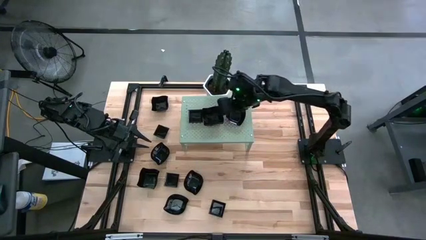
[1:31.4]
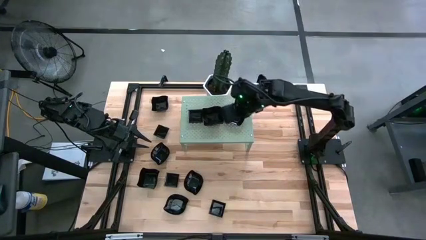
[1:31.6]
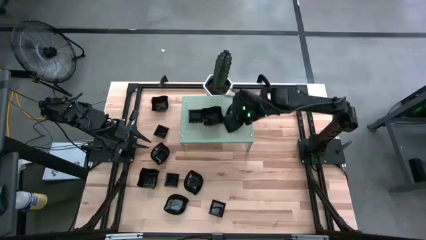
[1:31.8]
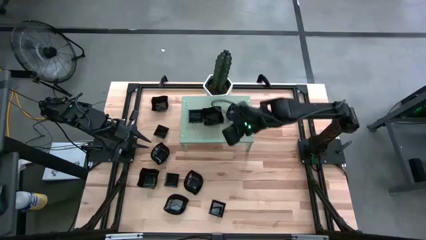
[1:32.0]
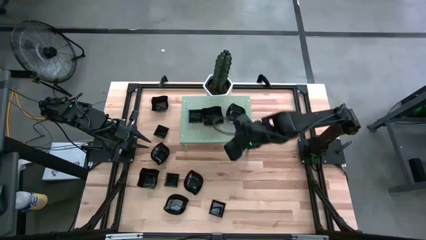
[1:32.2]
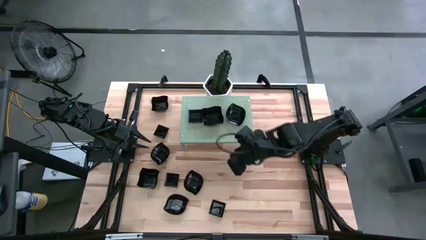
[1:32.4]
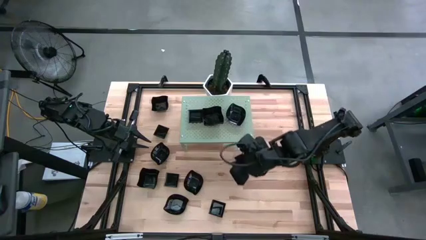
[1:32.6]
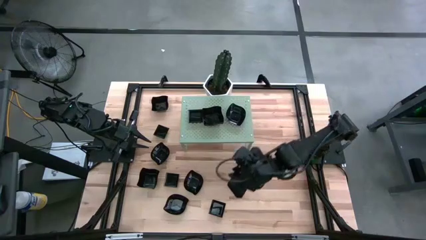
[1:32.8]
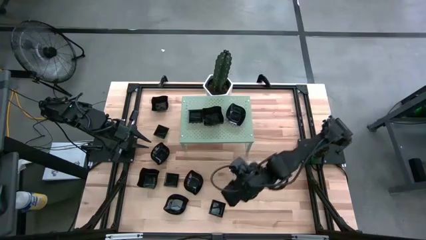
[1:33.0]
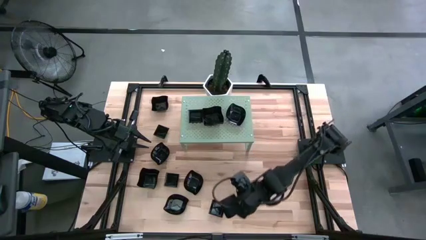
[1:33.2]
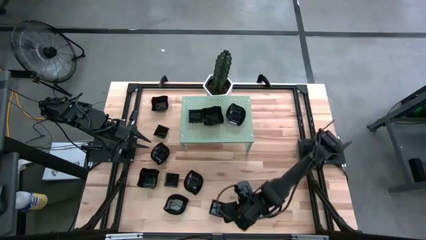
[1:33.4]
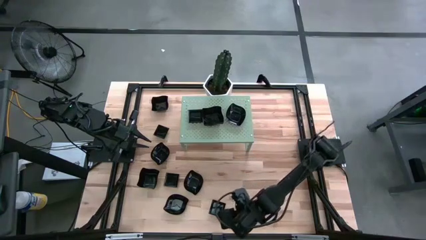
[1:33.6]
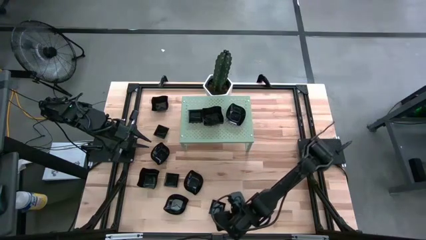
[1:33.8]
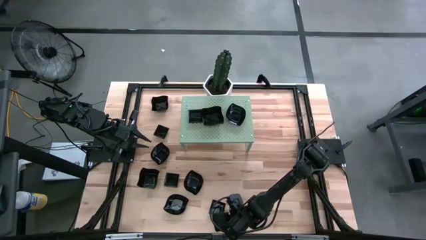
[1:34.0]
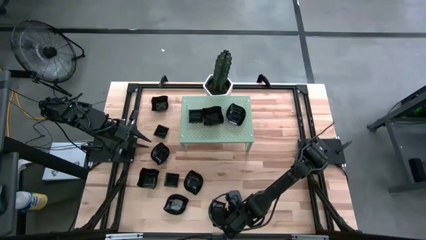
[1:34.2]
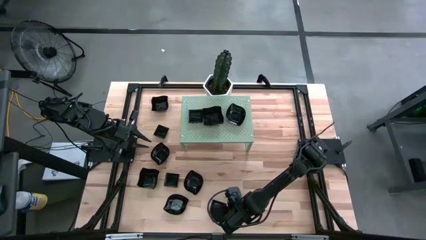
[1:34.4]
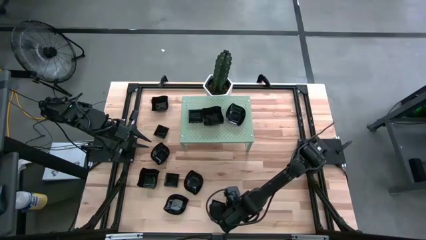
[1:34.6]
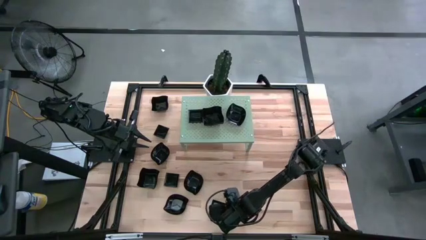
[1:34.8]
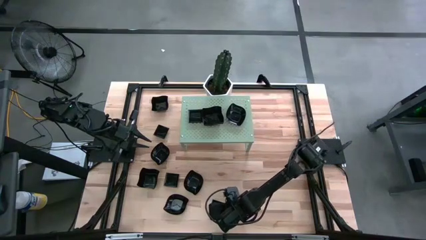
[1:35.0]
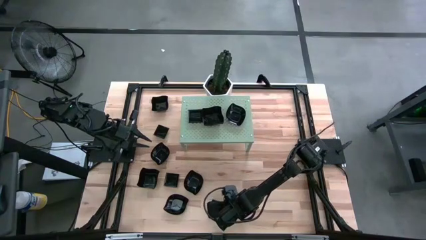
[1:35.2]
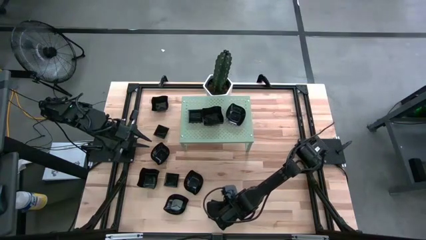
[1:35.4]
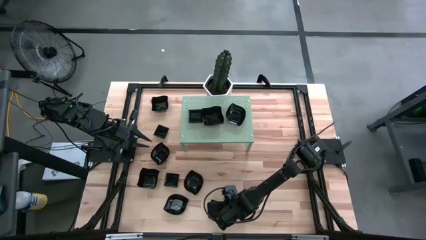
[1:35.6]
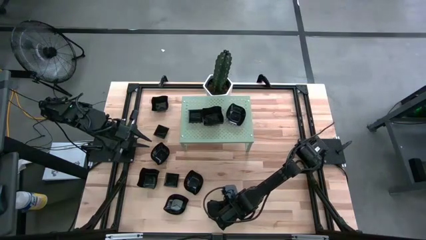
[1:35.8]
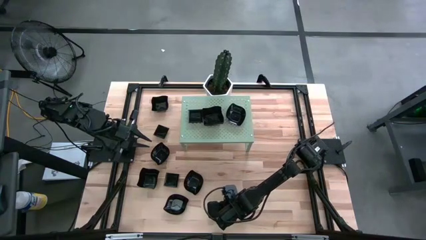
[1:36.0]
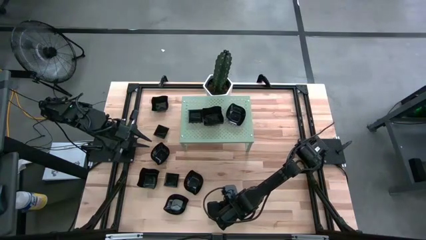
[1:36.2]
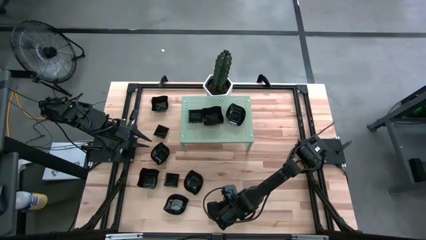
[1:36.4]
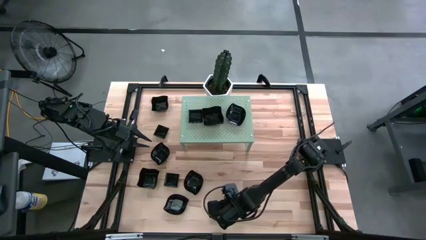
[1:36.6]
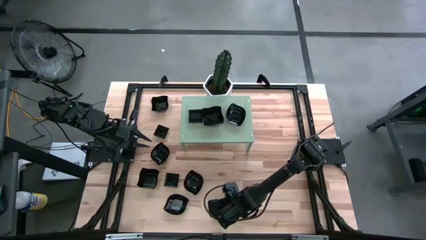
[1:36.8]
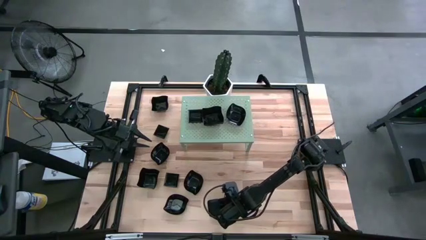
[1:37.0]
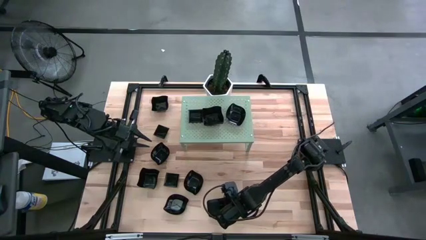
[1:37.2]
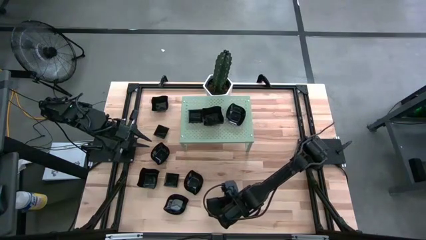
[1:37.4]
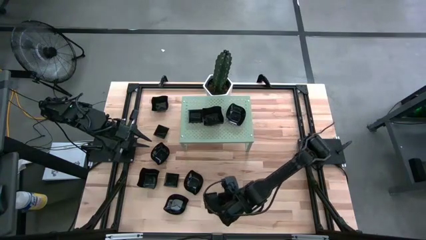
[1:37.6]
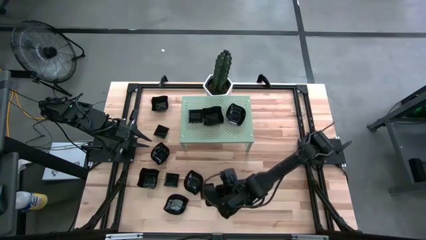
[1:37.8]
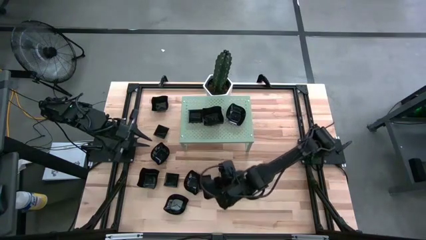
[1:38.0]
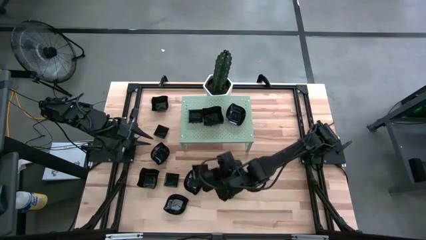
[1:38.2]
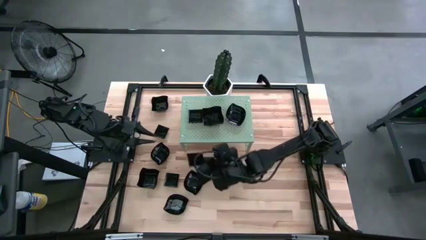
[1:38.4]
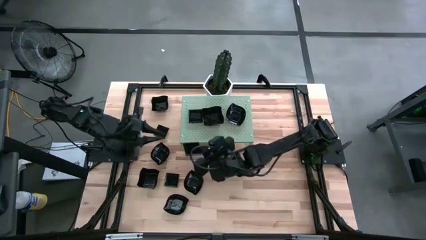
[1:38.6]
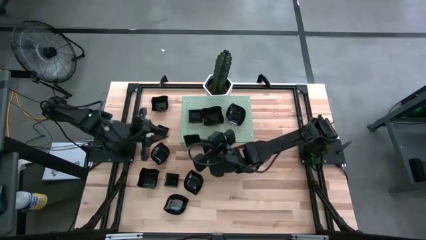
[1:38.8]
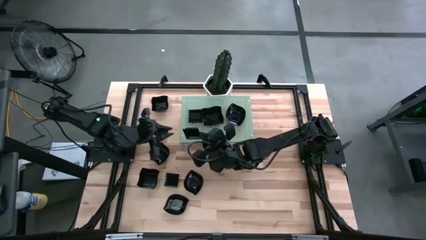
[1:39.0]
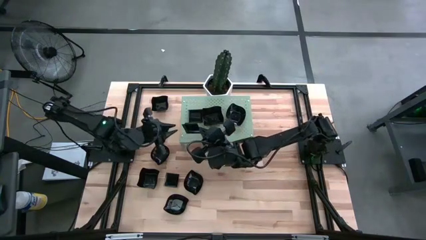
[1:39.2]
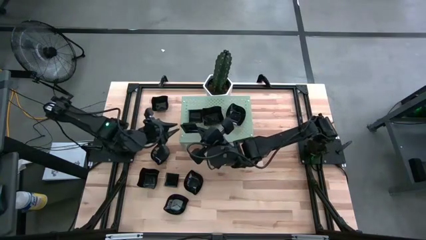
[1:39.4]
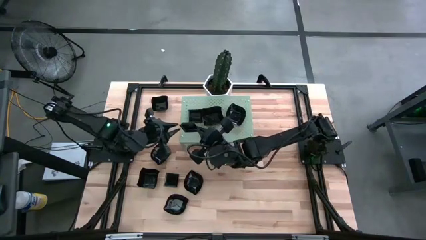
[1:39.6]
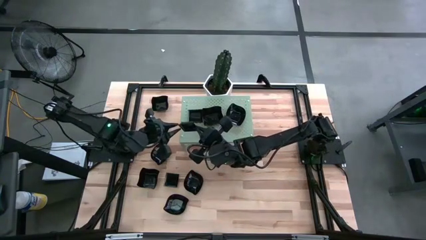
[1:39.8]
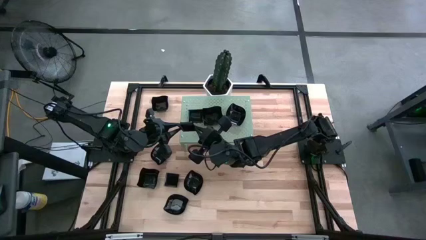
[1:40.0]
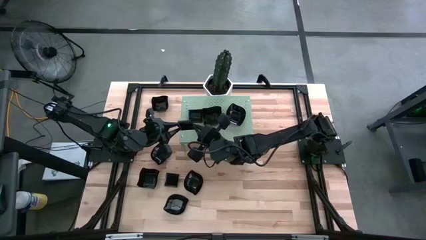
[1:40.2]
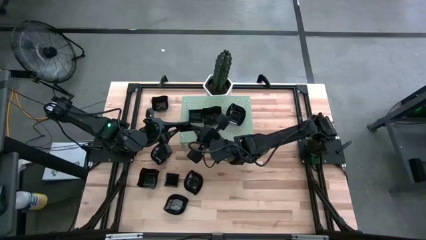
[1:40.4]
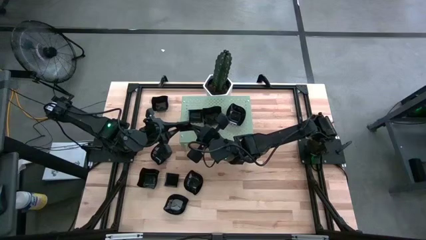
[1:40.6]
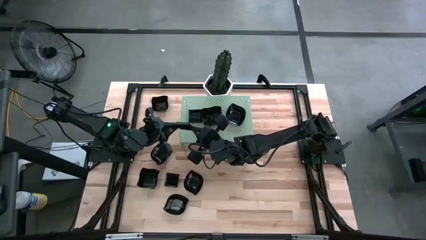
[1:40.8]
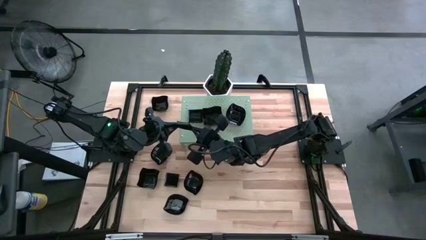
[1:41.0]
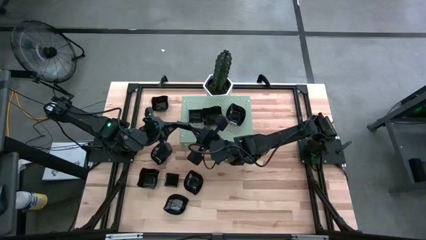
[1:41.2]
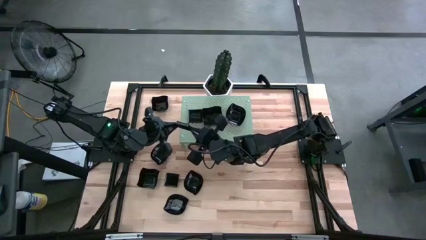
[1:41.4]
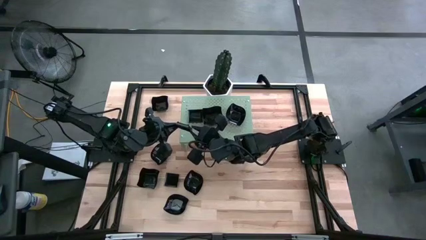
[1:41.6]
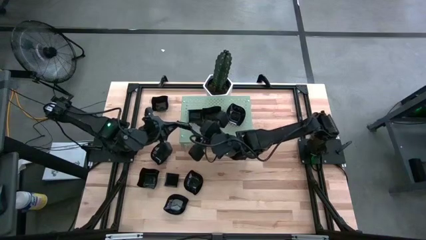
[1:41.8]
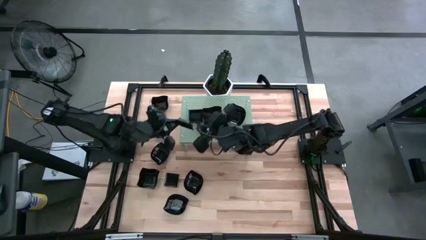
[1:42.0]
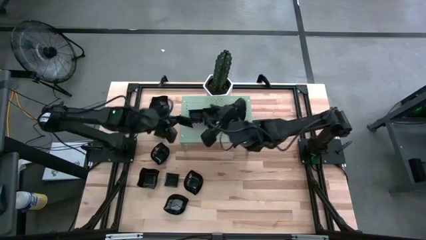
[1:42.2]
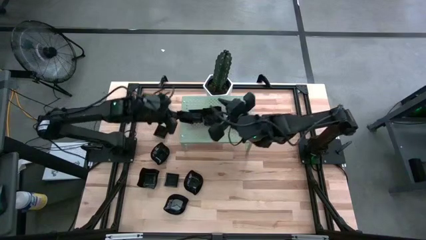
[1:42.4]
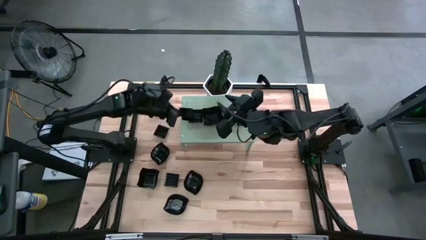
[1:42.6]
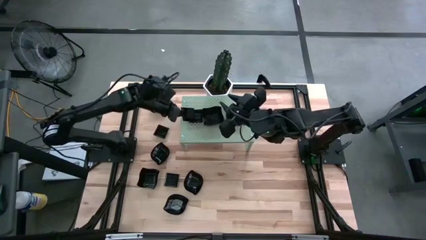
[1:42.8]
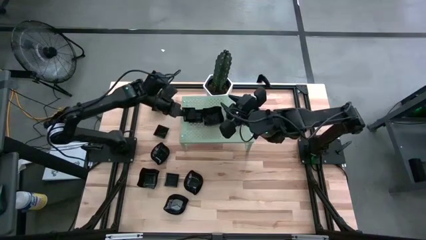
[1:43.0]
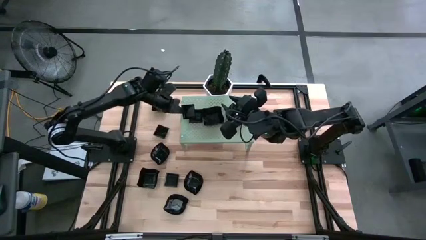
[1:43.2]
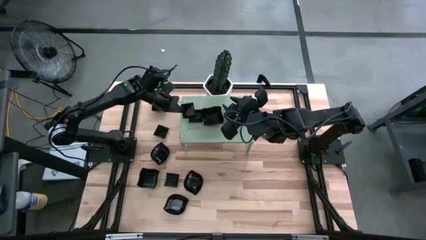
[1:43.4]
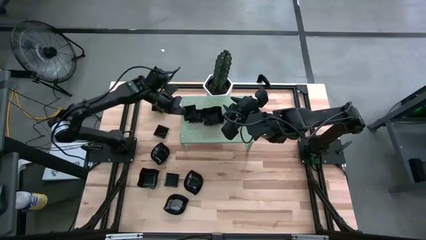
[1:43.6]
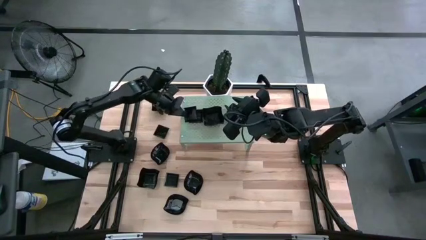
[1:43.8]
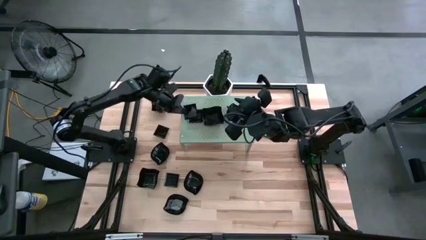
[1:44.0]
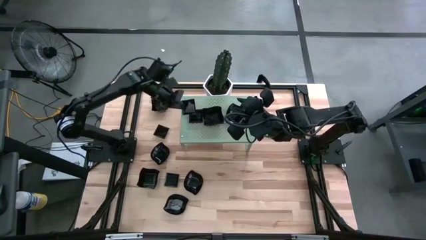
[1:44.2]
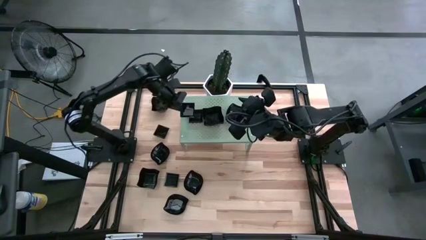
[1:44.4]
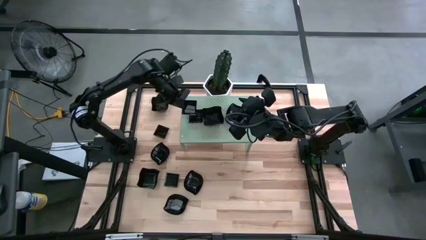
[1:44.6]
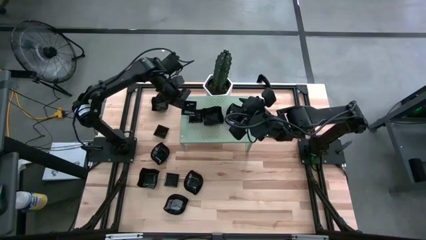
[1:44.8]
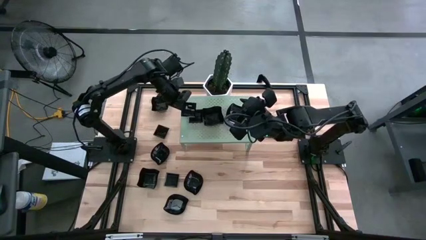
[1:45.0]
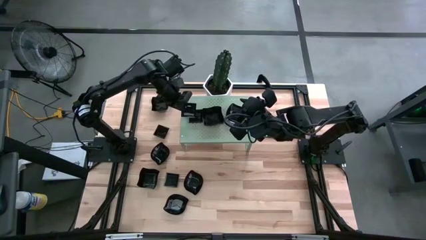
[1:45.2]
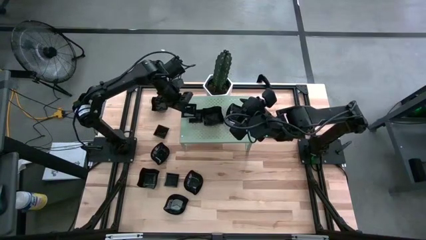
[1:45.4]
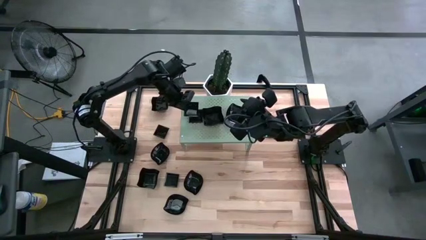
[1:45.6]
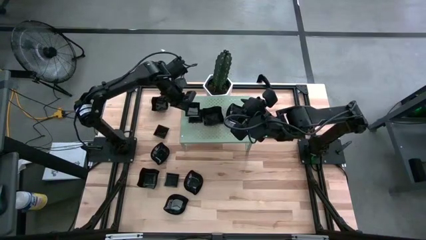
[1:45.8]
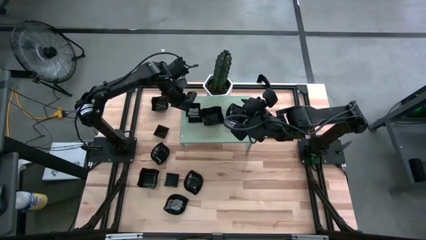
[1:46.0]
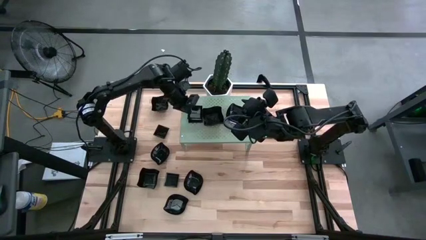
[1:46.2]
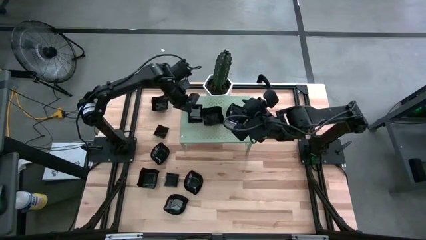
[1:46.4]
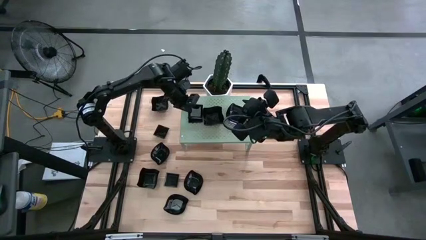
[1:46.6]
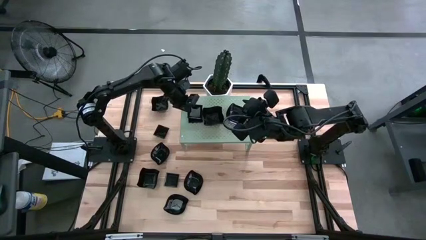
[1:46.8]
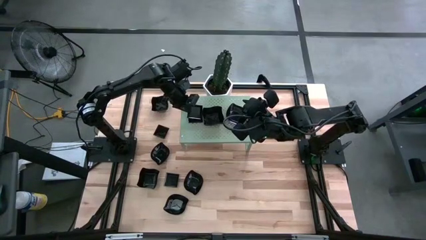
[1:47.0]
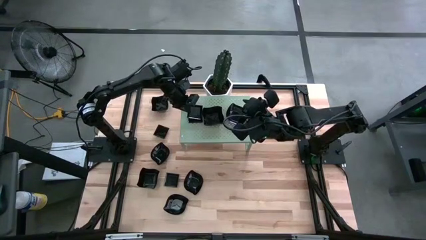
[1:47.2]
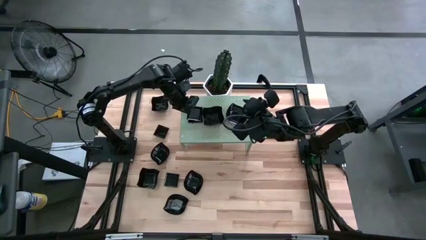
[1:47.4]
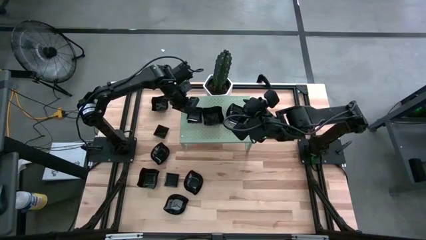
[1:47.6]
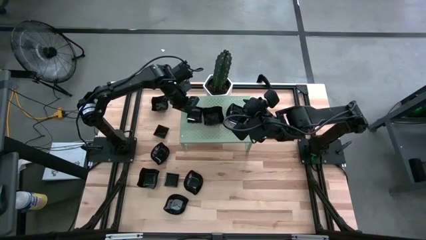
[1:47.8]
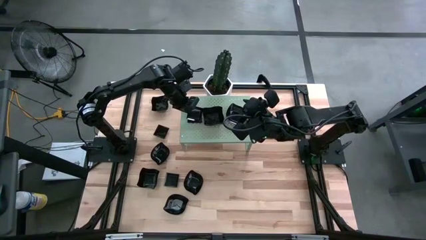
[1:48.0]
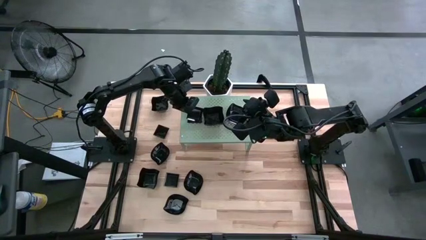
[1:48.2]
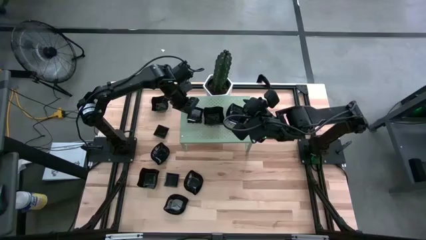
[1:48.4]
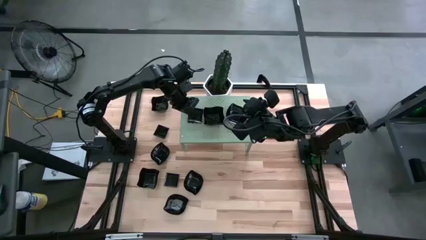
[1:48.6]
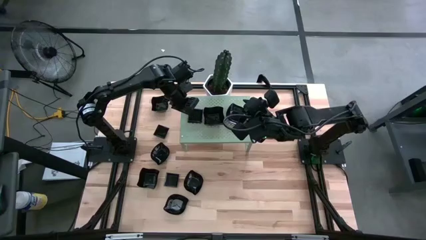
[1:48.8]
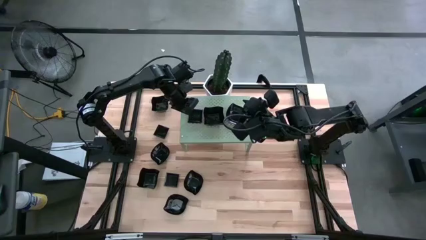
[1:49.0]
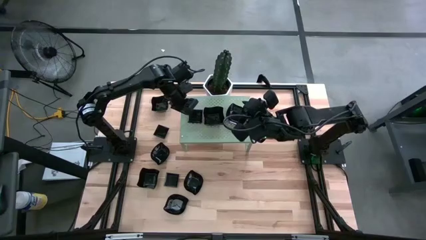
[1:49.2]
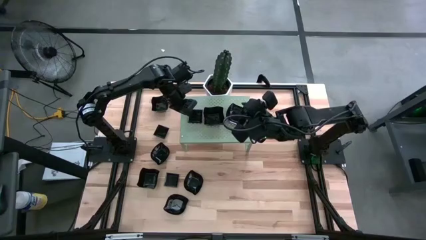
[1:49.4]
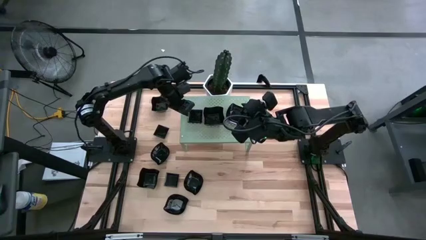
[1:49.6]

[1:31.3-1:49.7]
Task: Pick & Place Mini shaped plates
Stack the square plate on top of the square plates on the shelf
